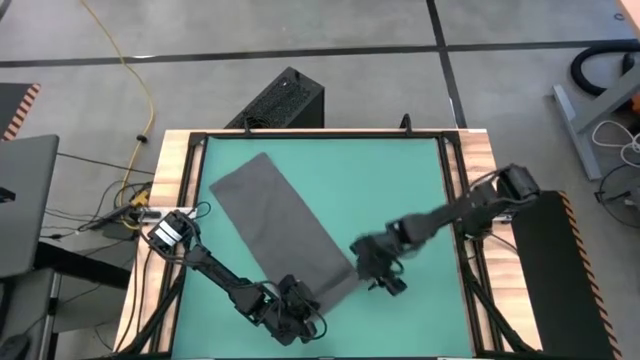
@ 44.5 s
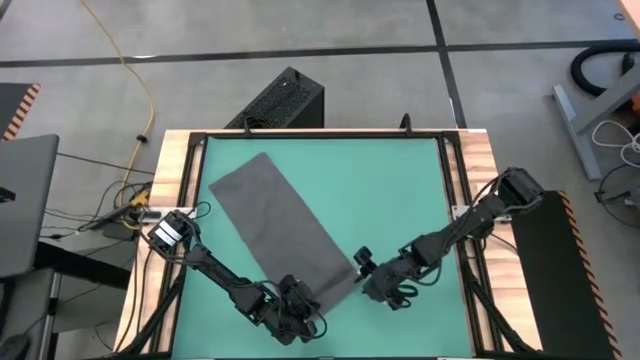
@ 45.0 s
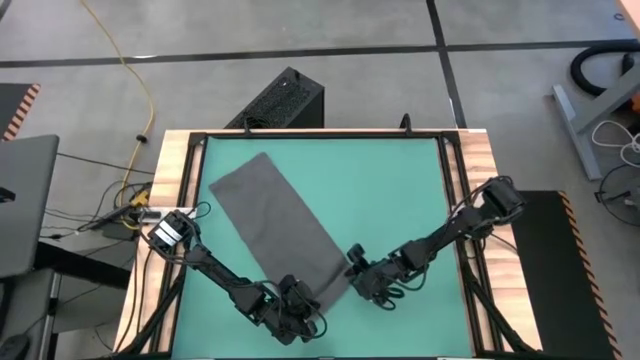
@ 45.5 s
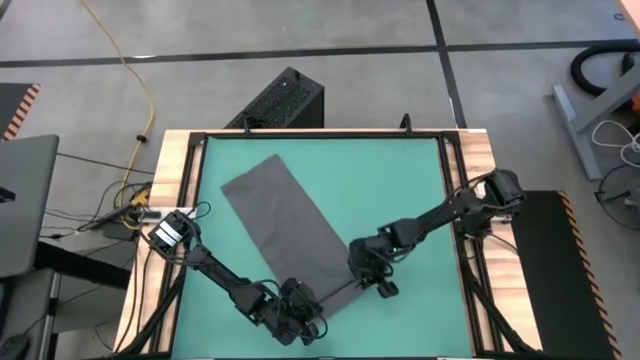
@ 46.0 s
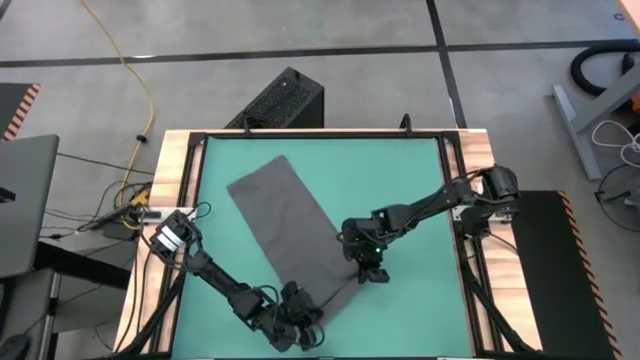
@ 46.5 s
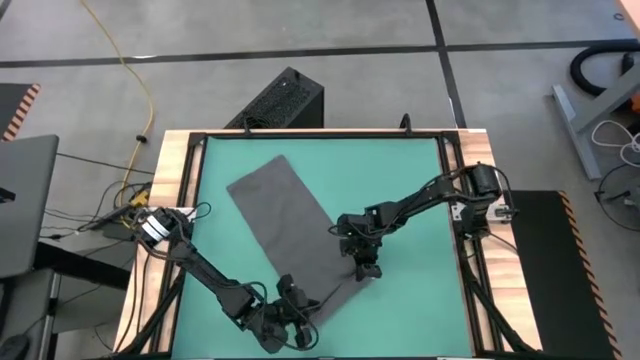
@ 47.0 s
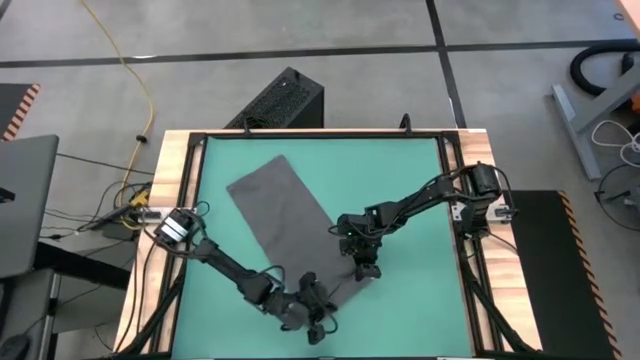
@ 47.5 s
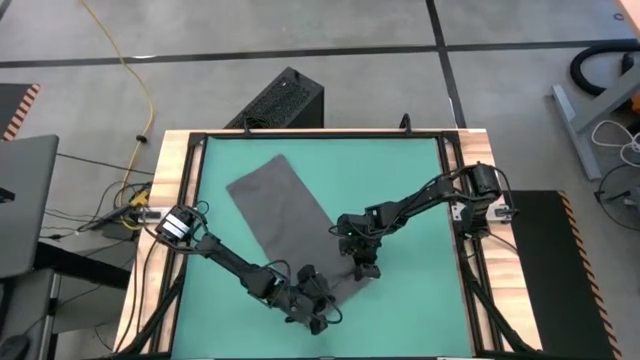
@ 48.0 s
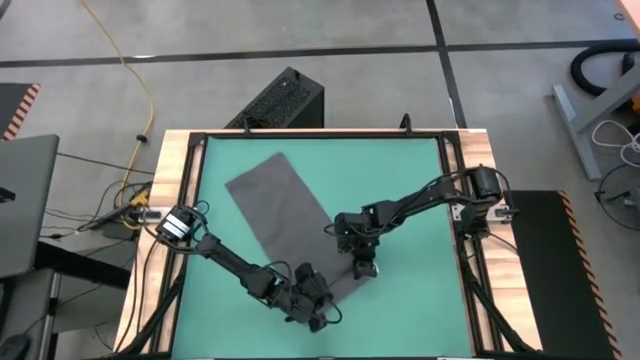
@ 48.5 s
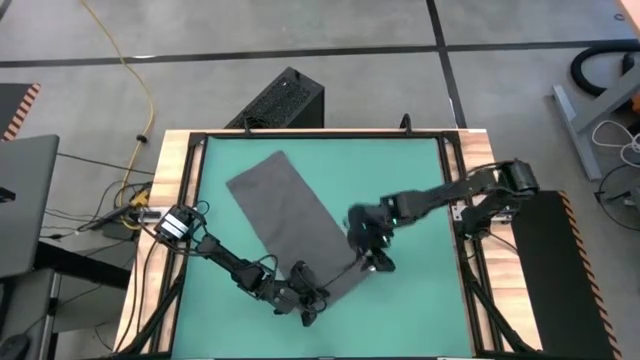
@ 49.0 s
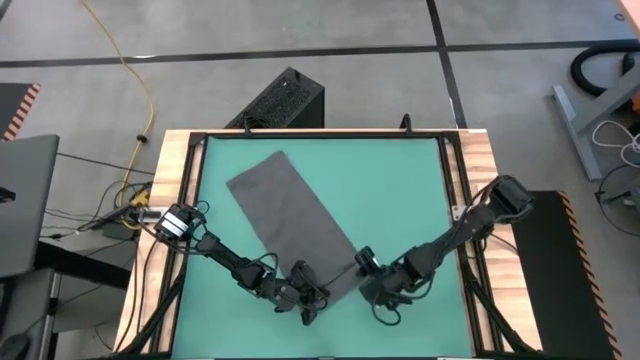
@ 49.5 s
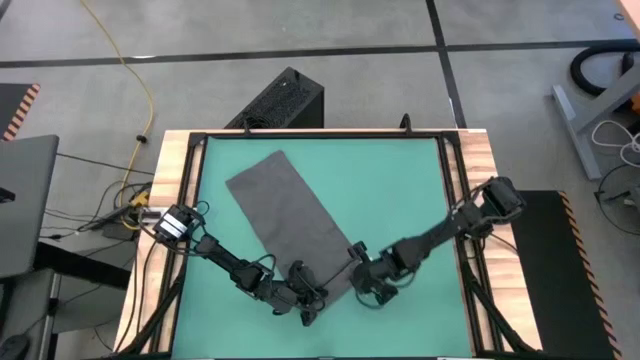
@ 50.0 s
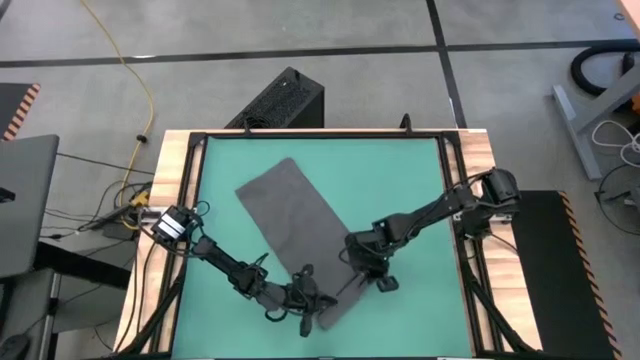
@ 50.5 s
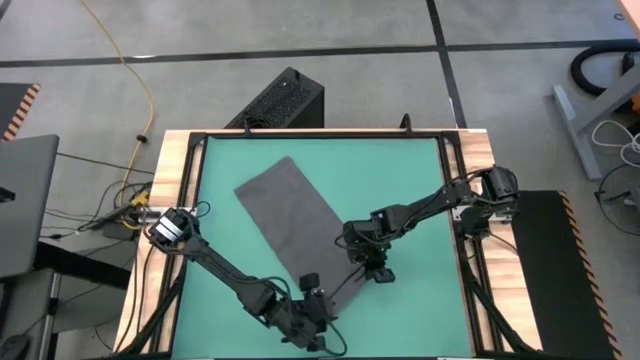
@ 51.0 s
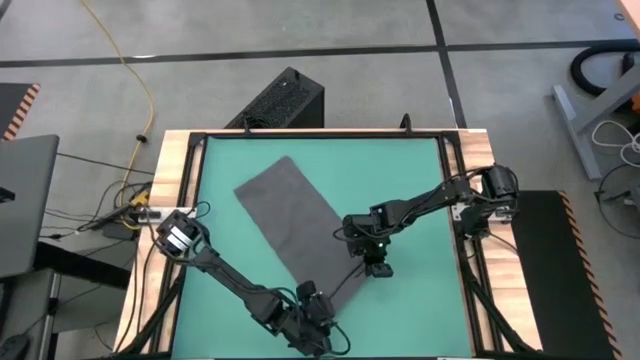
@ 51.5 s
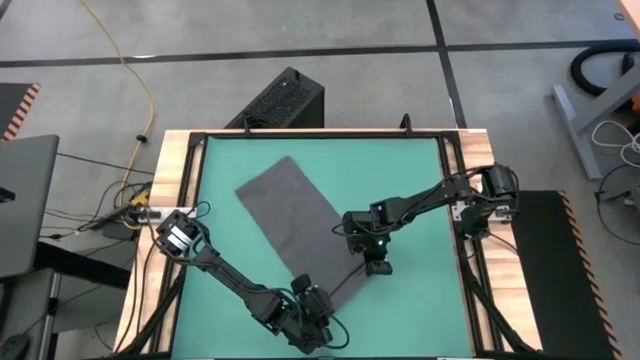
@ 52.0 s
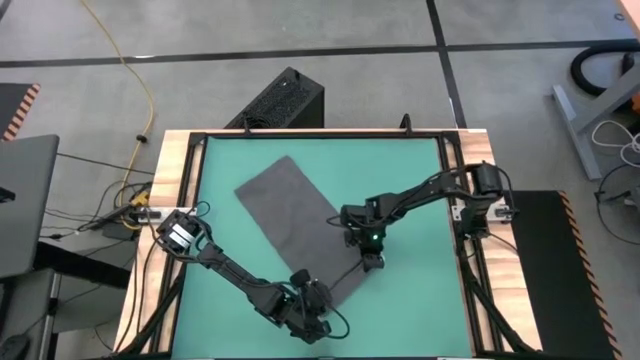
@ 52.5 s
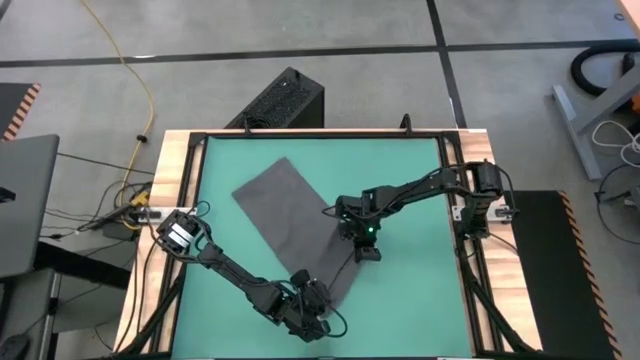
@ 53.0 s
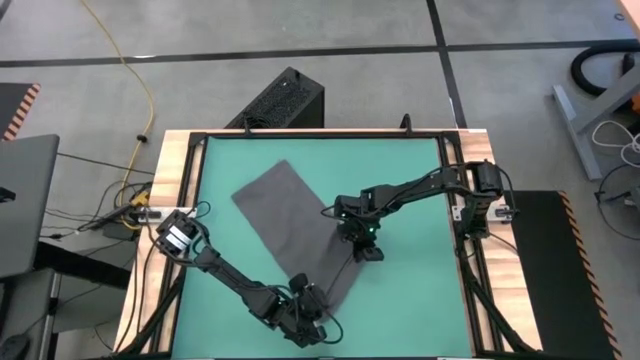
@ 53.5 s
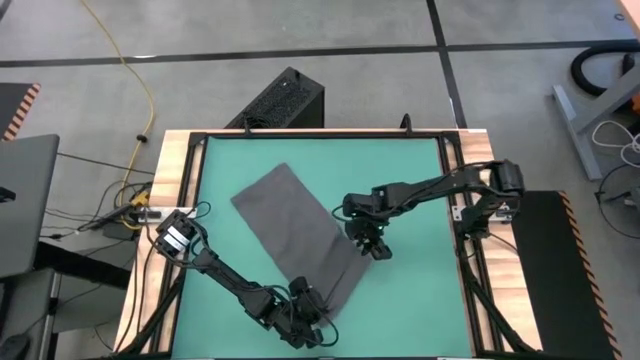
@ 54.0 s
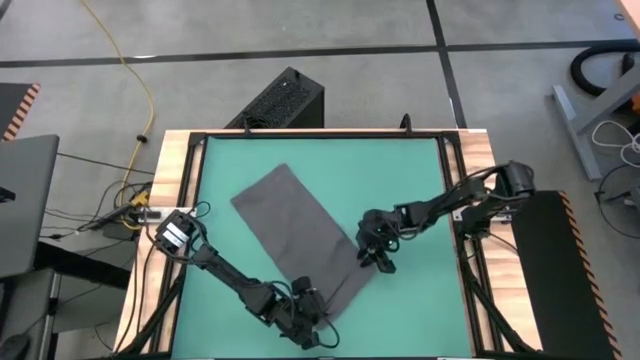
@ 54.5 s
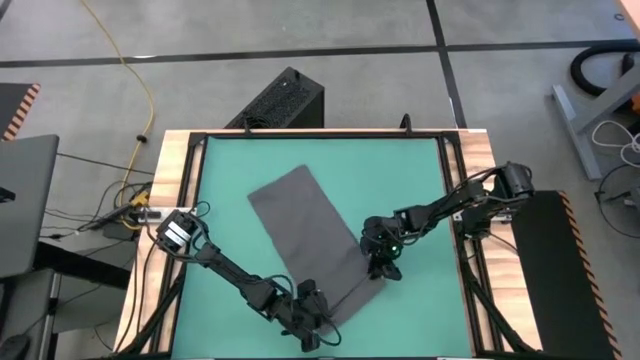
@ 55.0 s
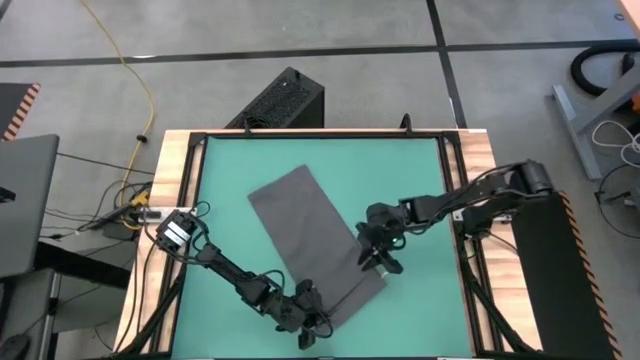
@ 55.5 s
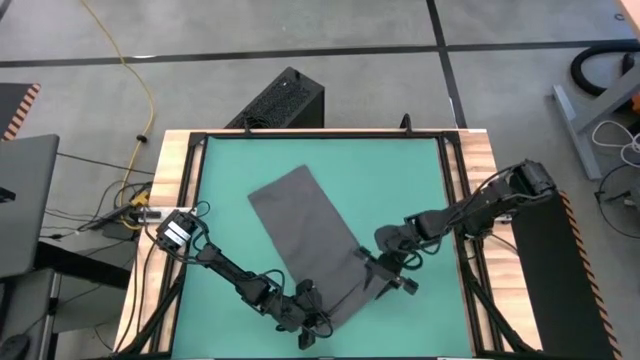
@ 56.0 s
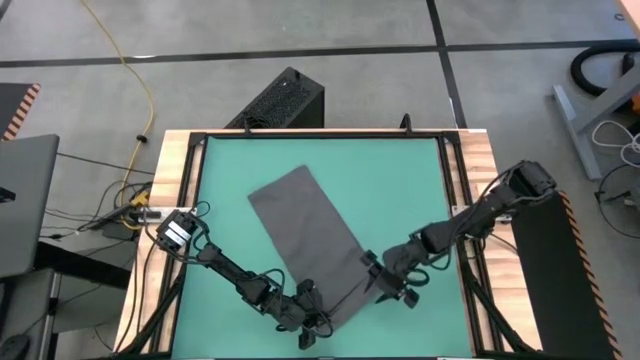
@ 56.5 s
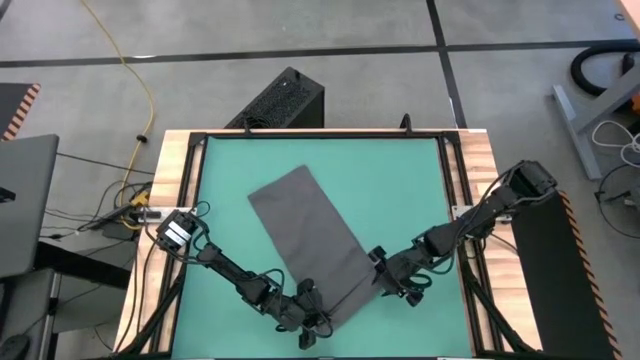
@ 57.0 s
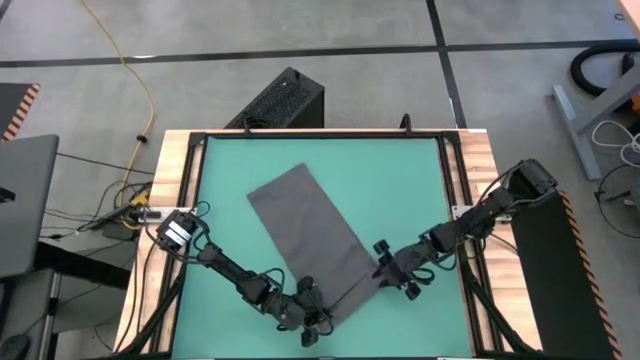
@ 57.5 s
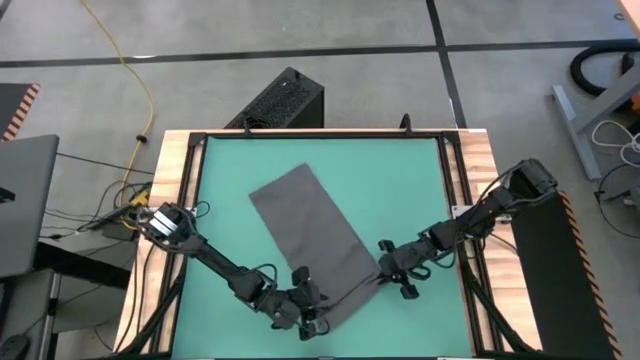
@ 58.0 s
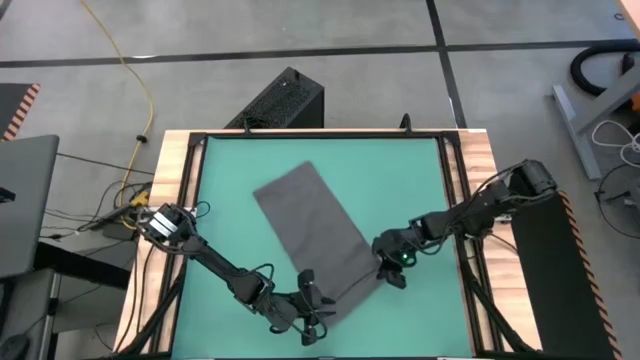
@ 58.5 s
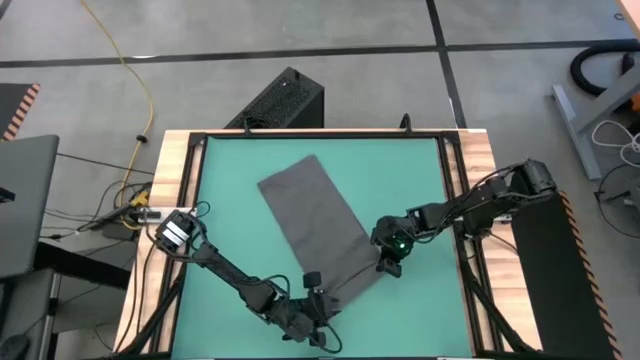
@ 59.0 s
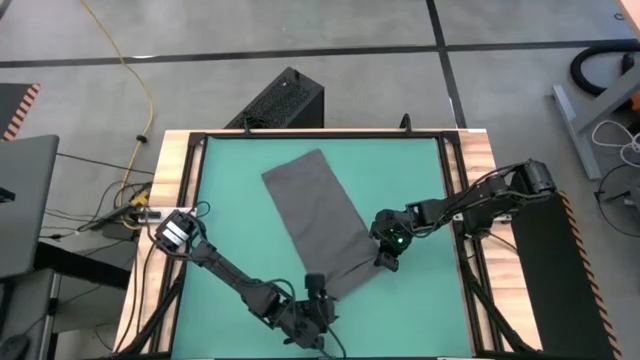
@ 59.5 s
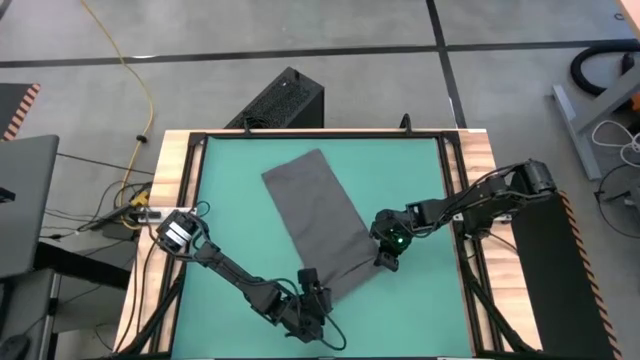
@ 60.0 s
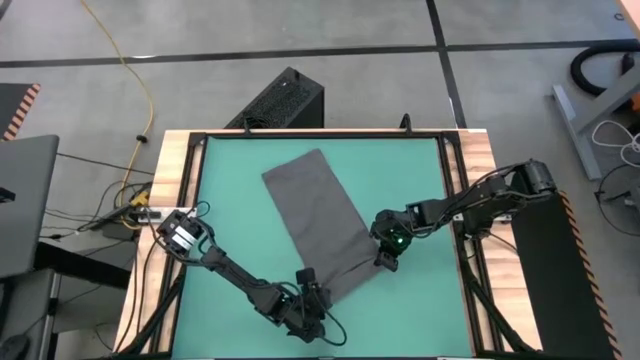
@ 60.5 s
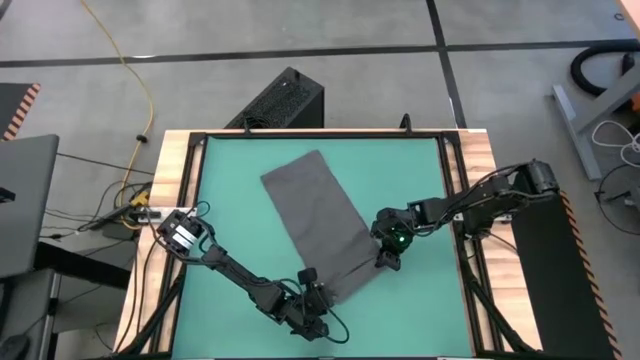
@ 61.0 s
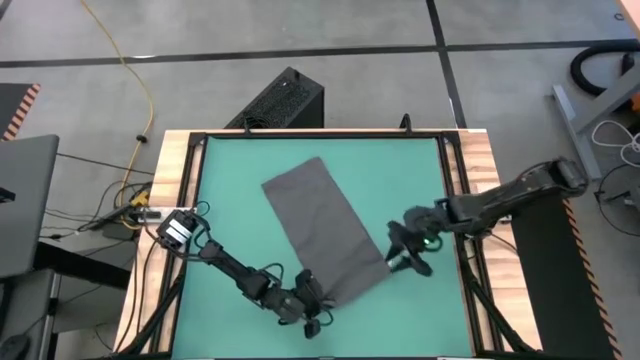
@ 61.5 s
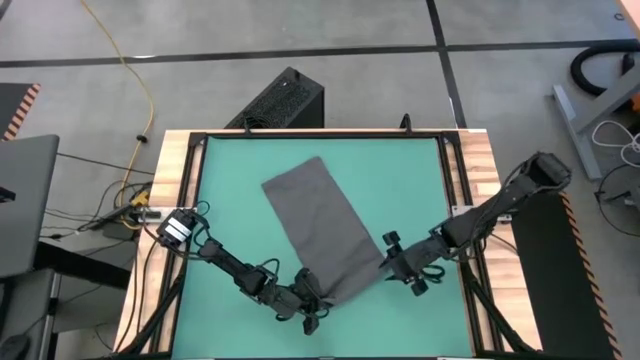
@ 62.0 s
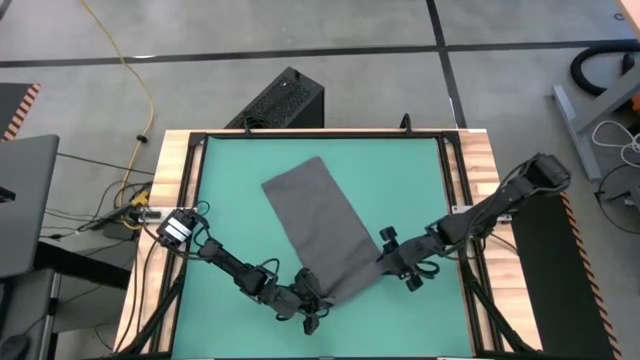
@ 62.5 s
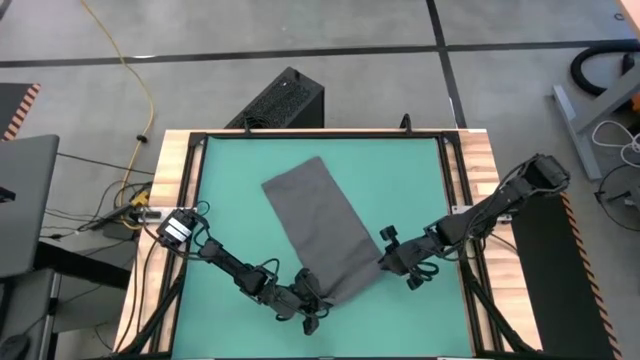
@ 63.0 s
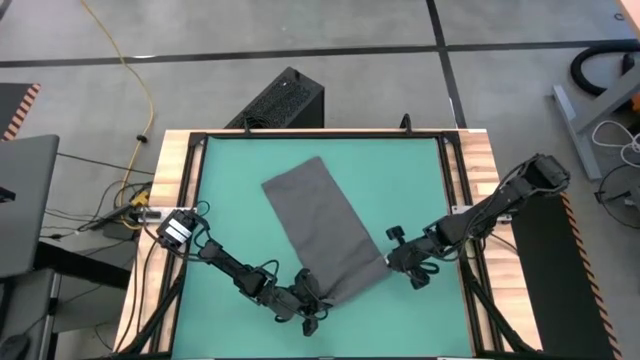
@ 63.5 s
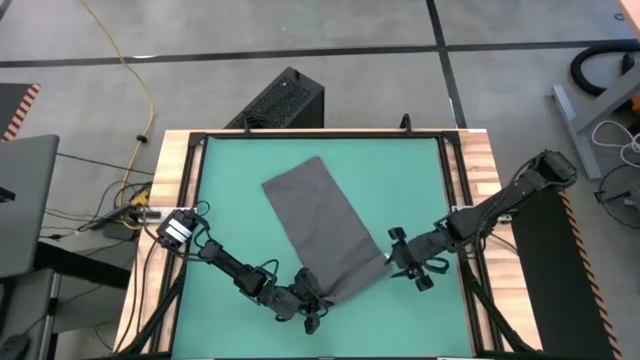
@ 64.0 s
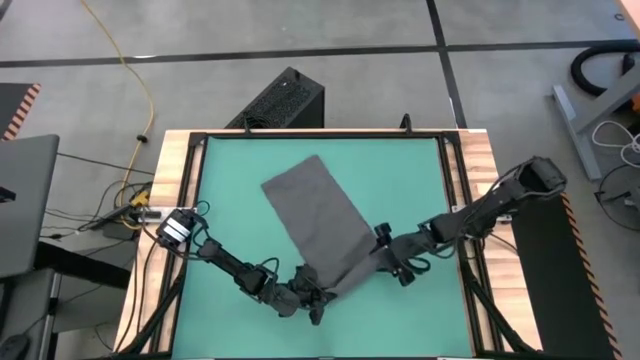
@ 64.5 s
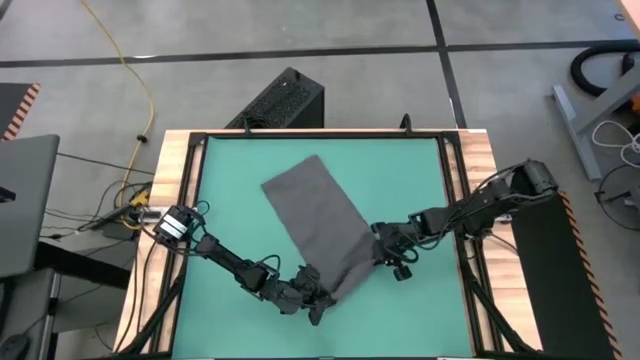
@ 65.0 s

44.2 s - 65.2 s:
Task: Roll towel
Roll the black towel
